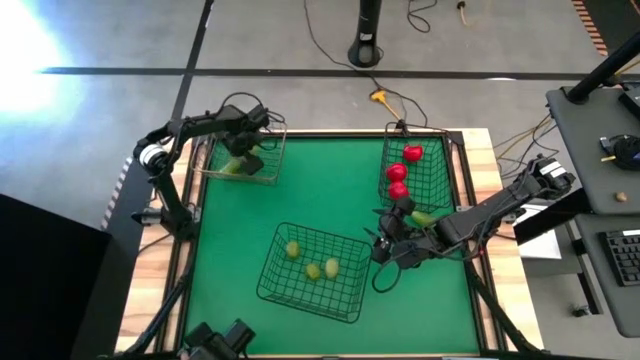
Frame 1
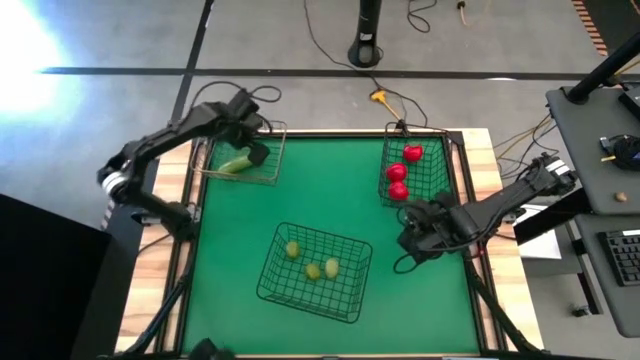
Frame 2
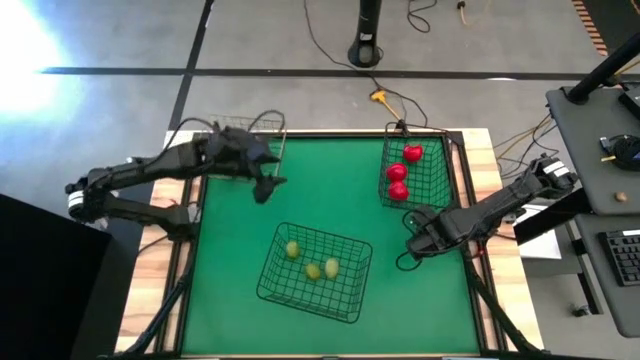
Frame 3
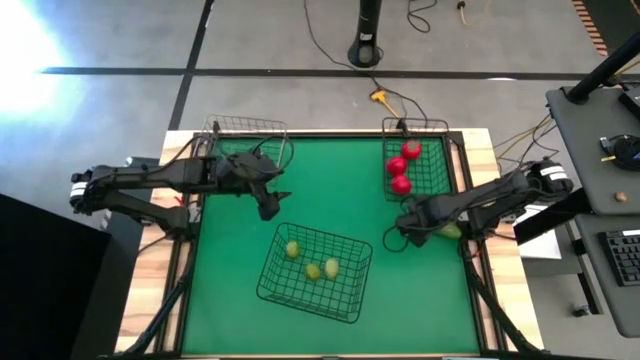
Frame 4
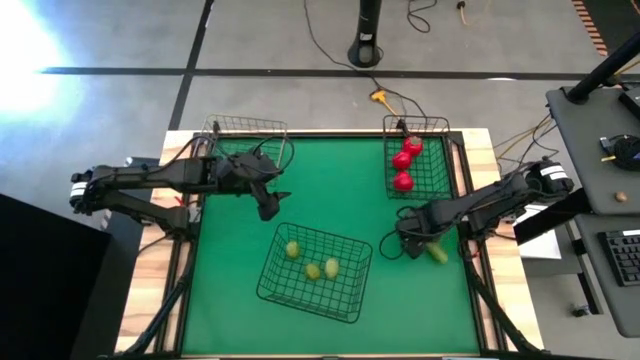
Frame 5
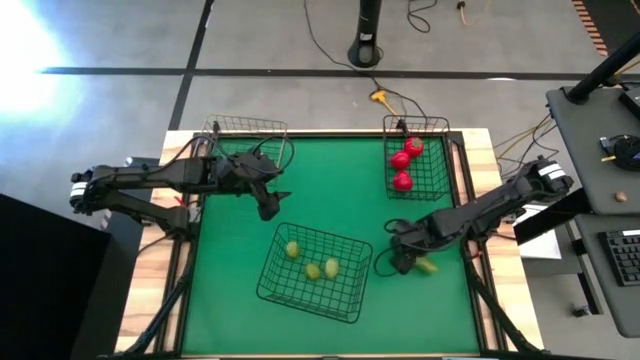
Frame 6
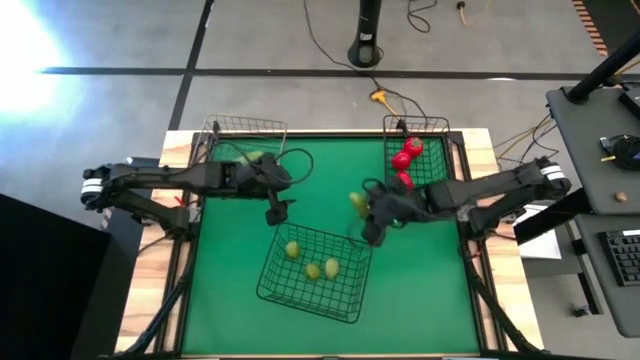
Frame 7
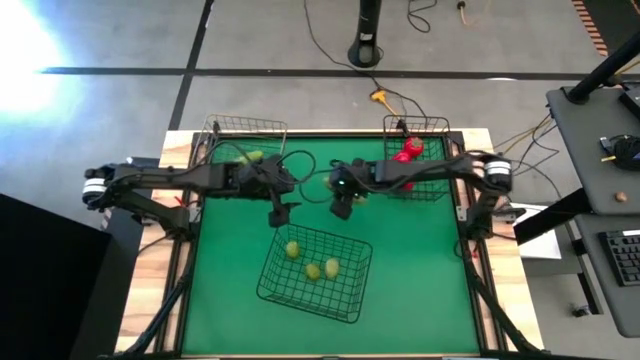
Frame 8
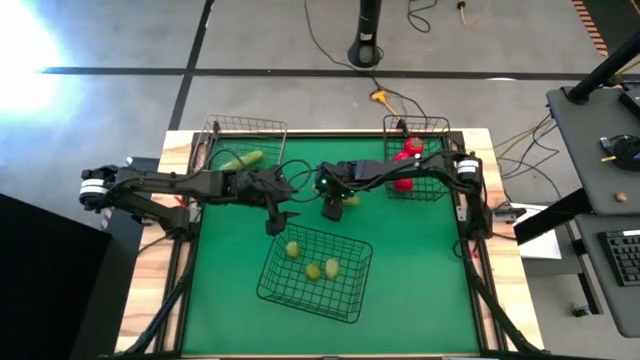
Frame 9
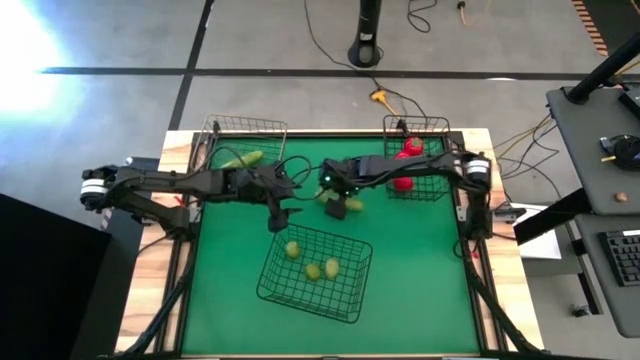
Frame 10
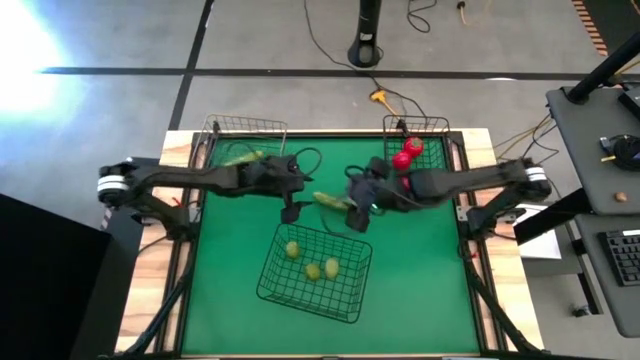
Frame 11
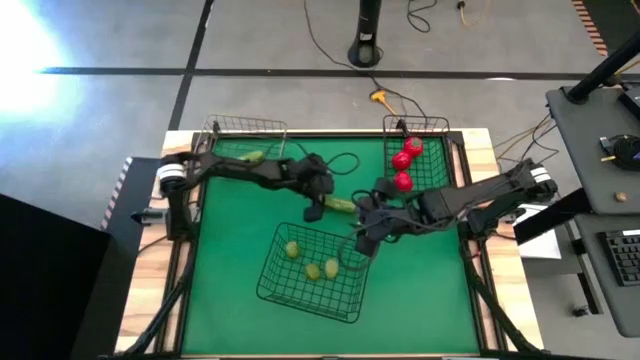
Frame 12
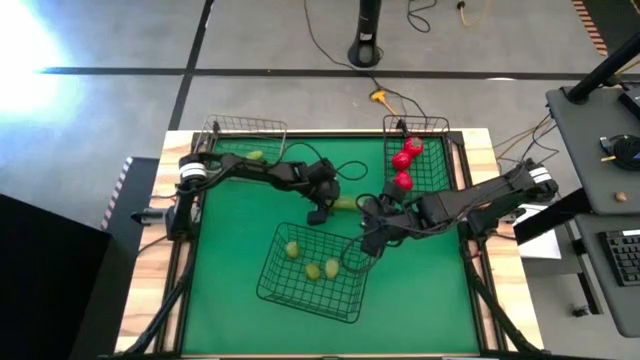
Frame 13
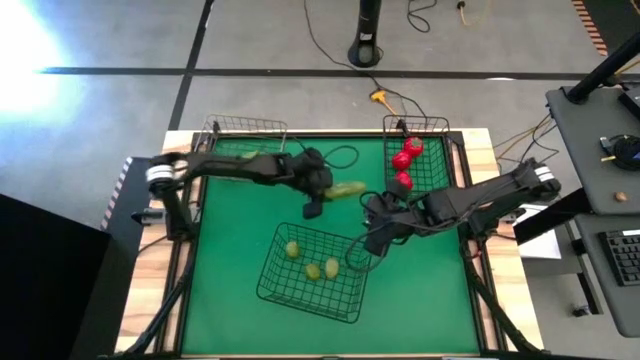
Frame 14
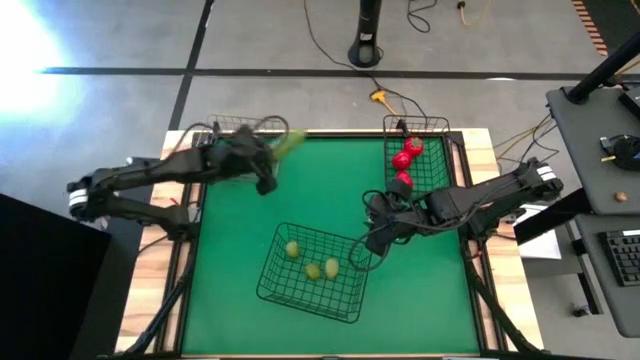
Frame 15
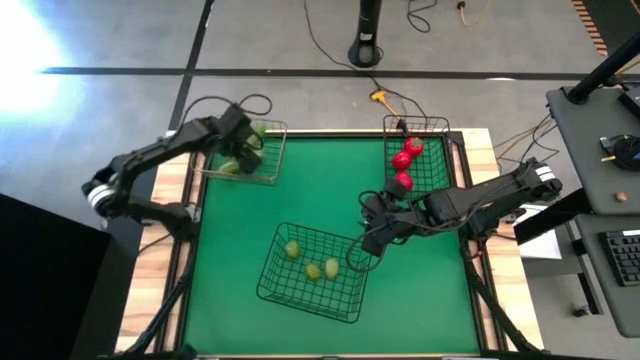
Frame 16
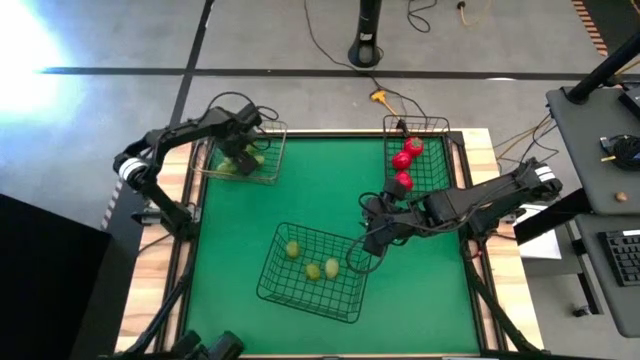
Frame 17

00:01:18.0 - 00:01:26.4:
Task: Sort produce into baskets
Put the cucumber into the silver wire basket

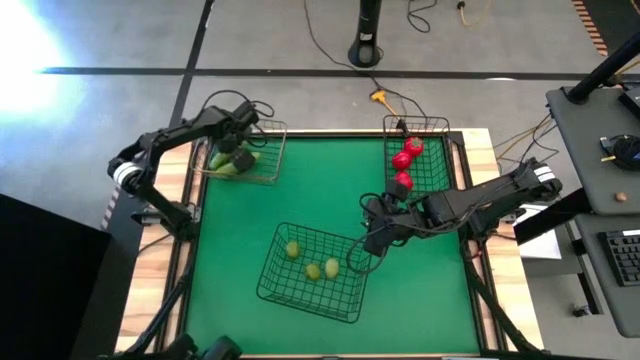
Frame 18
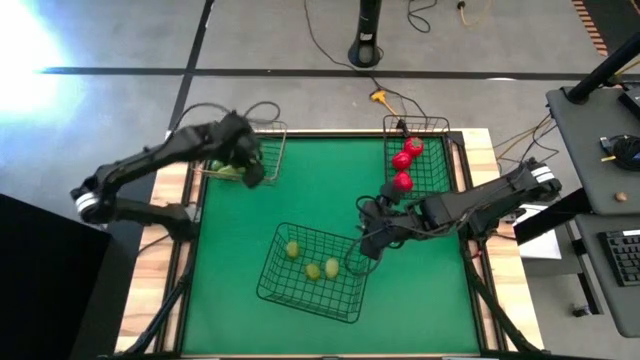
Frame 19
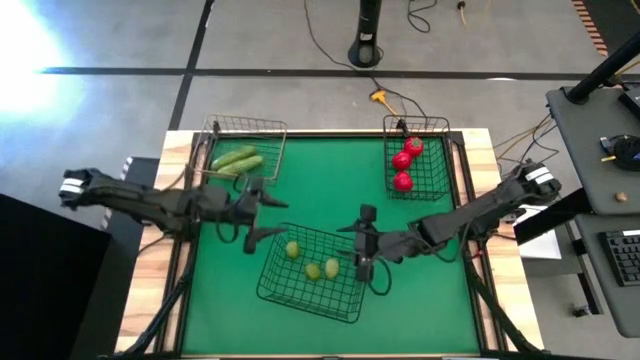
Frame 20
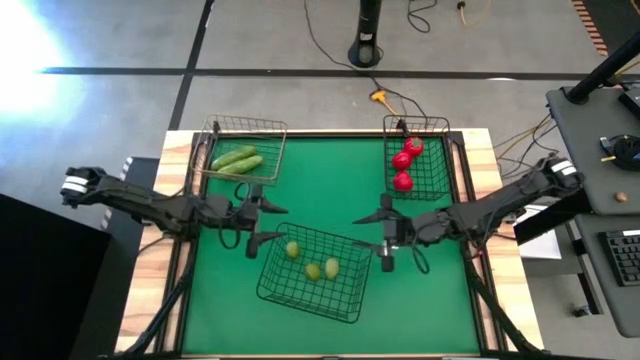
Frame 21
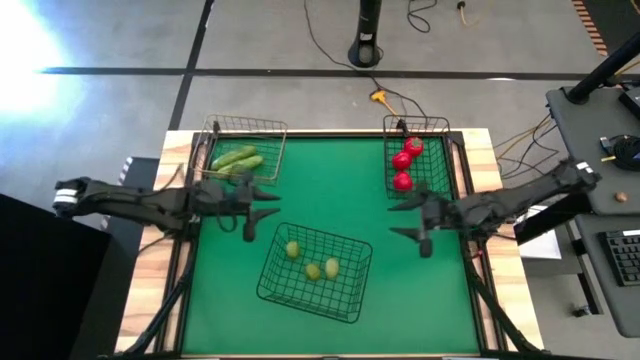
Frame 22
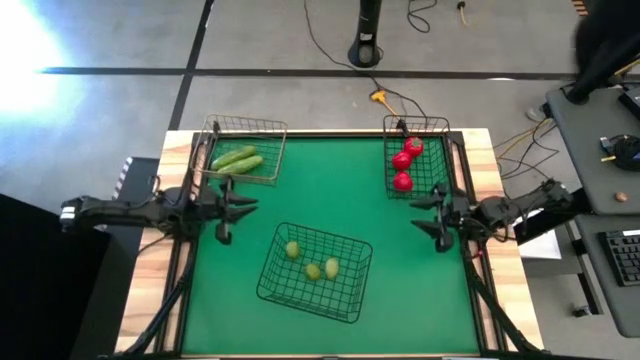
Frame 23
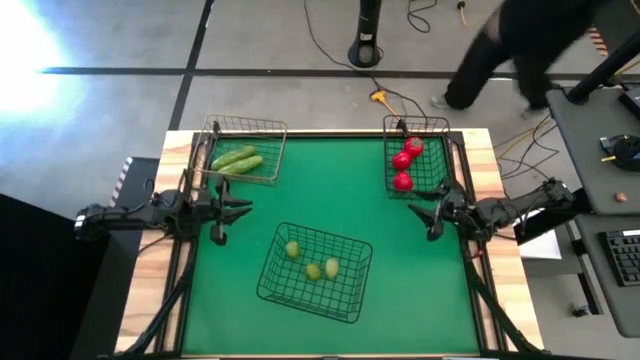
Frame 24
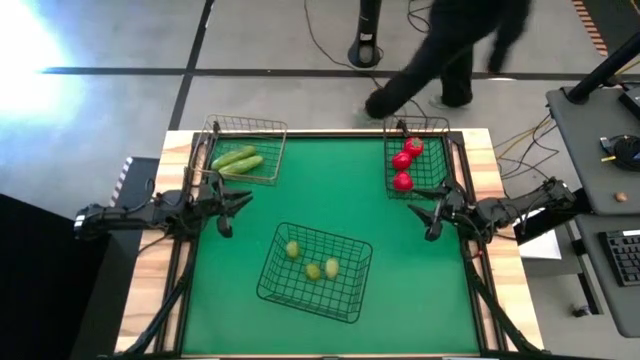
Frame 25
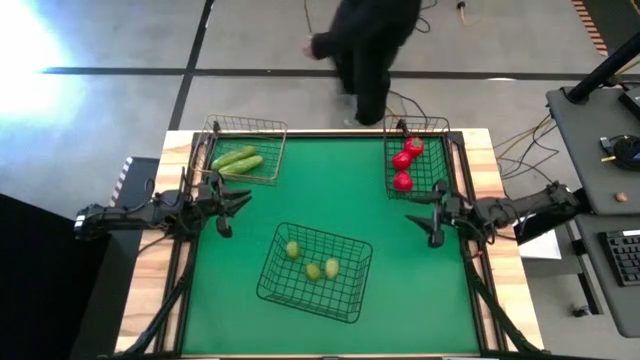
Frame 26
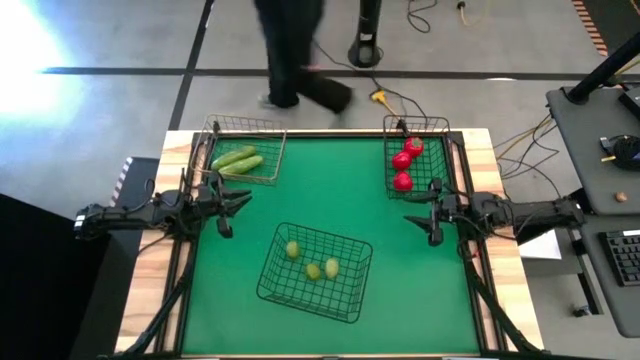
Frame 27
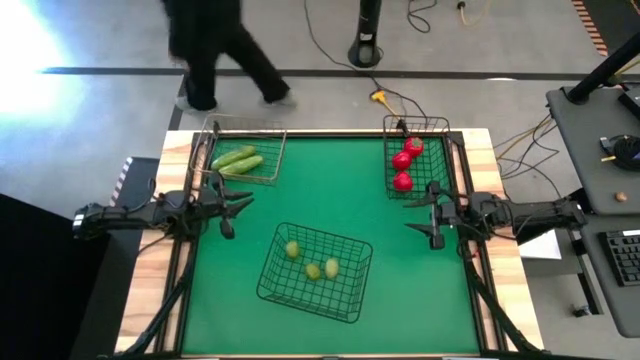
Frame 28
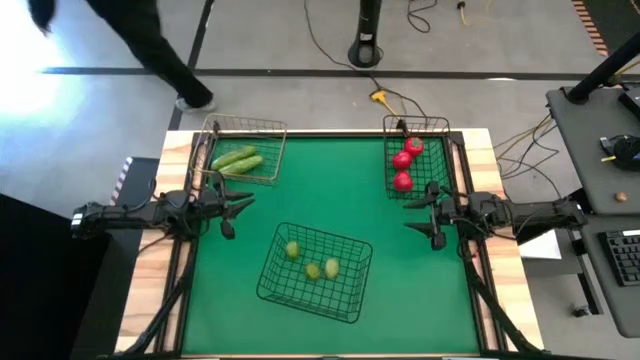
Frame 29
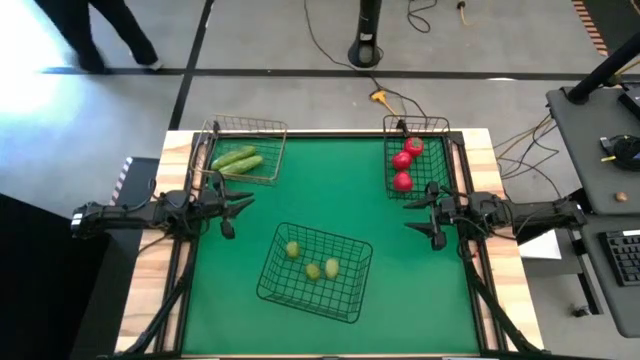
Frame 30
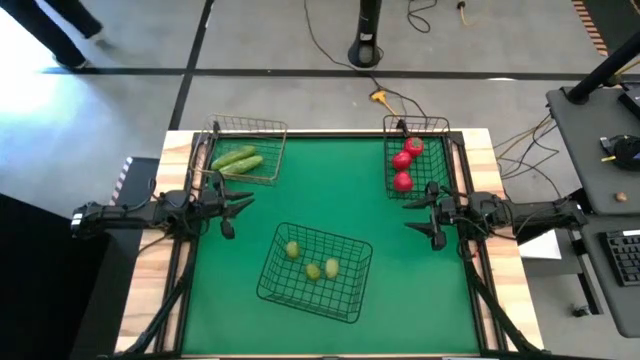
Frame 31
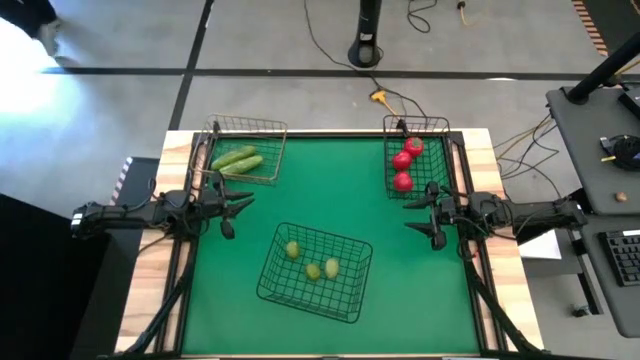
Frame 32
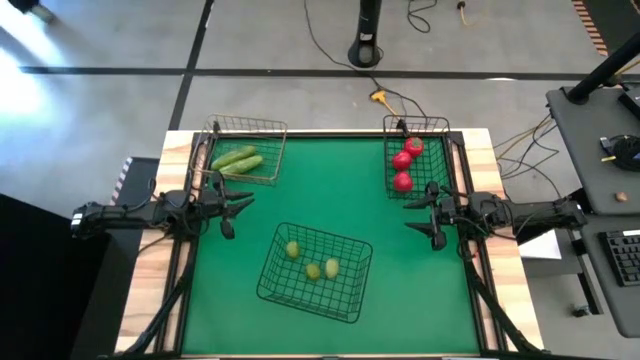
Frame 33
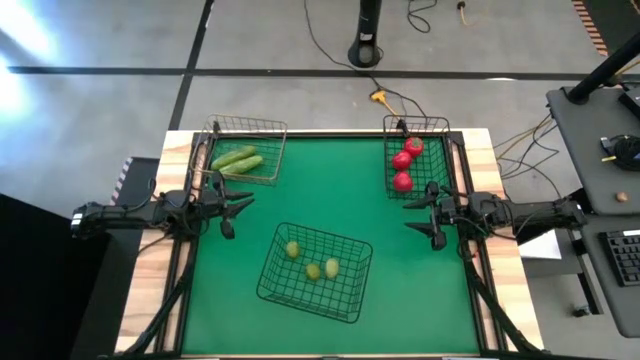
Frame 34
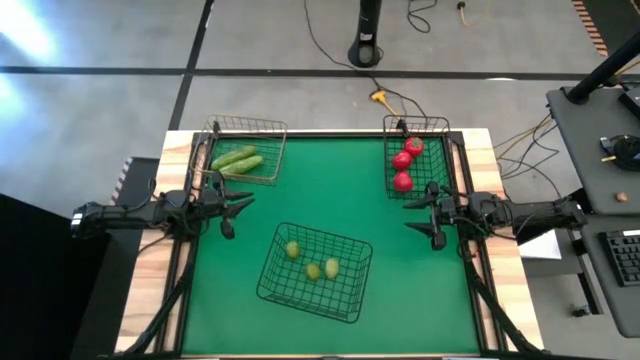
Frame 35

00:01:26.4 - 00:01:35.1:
Return to Home Position
